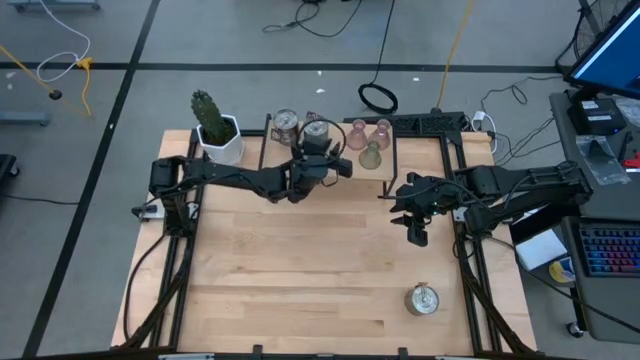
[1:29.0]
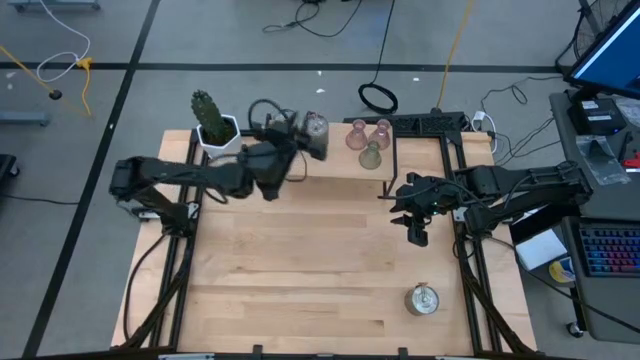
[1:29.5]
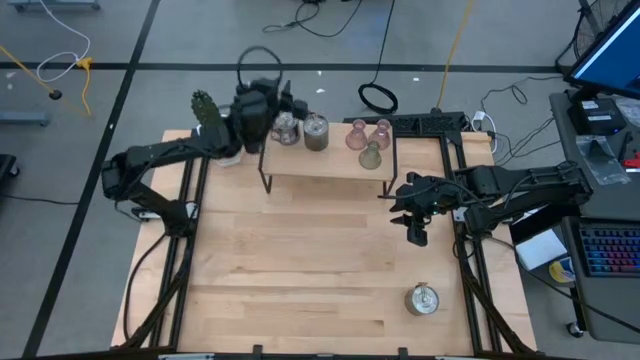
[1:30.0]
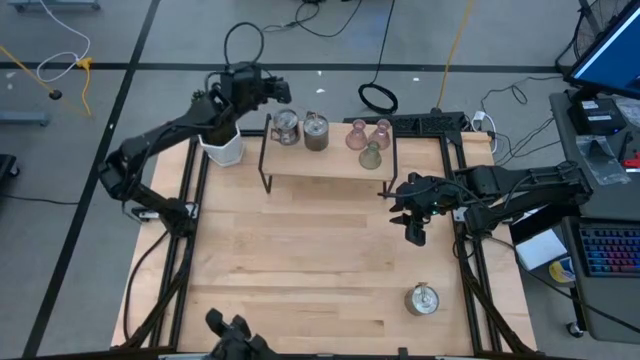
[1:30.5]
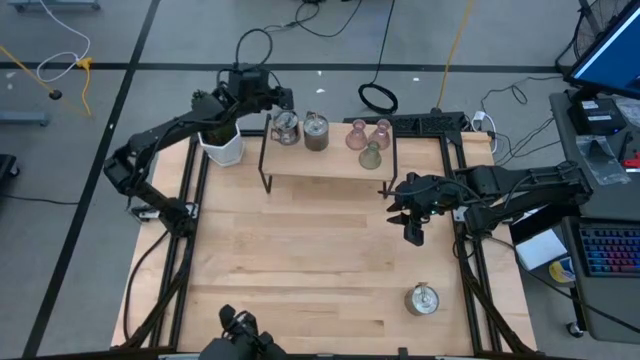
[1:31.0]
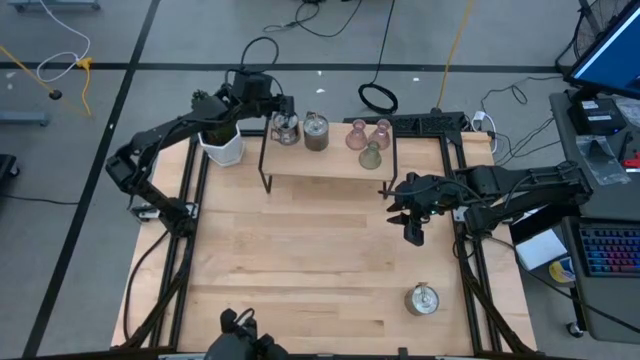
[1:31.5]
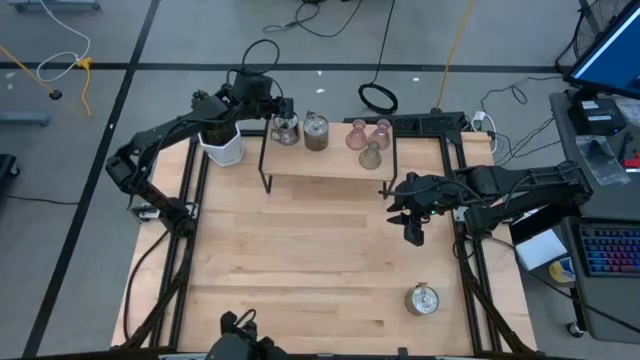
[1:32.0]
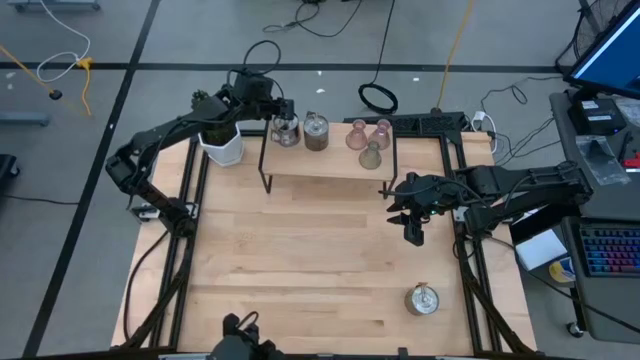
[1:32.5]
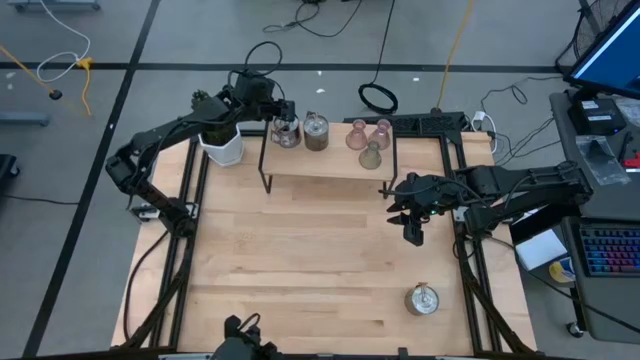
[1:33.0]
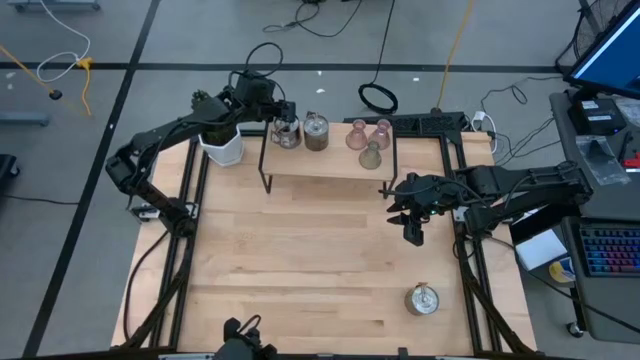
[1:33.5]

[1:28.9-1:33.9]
Task: Pick & Place candle stick holders
Adjust the silver scented candle on the shelf

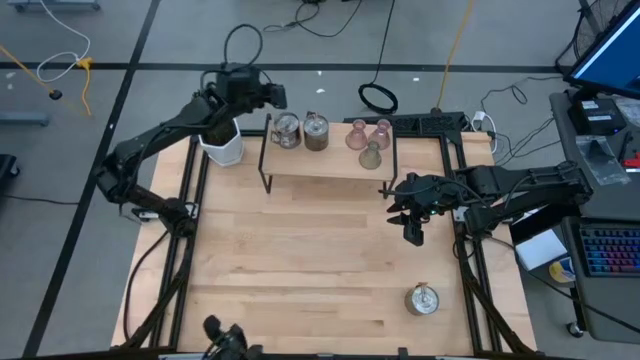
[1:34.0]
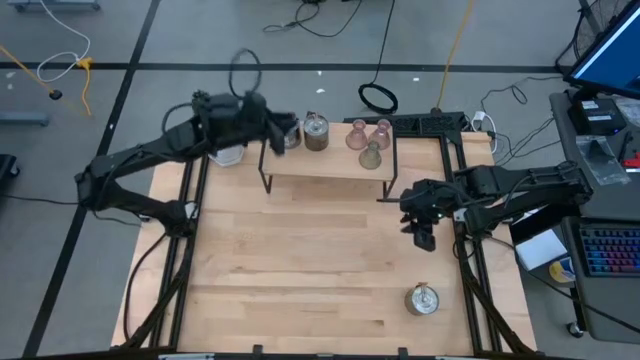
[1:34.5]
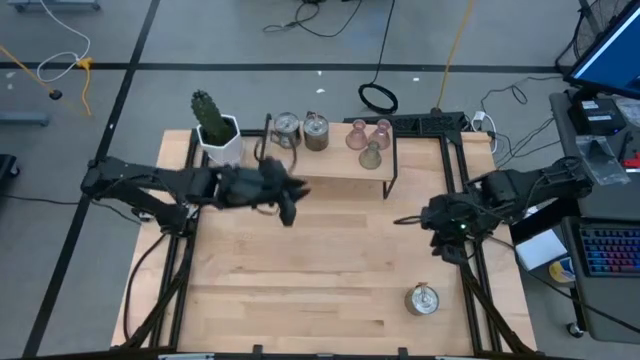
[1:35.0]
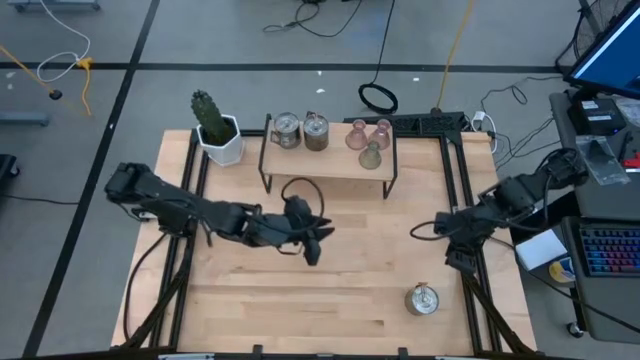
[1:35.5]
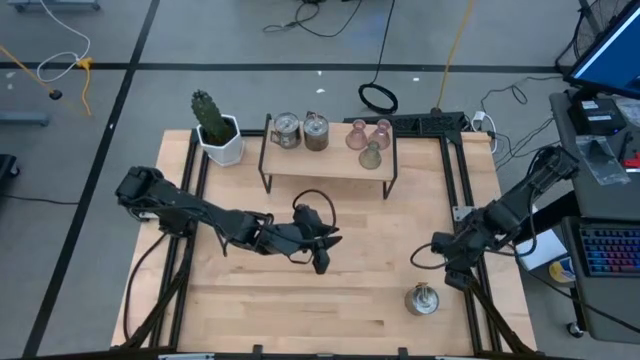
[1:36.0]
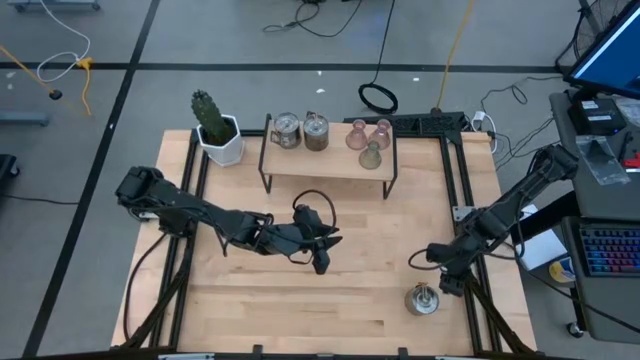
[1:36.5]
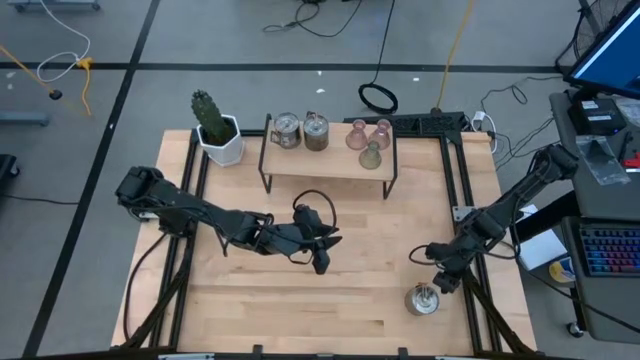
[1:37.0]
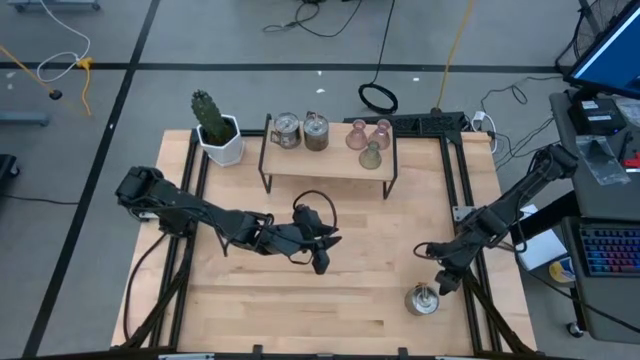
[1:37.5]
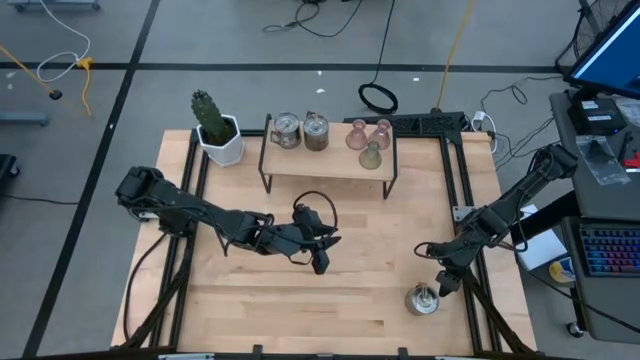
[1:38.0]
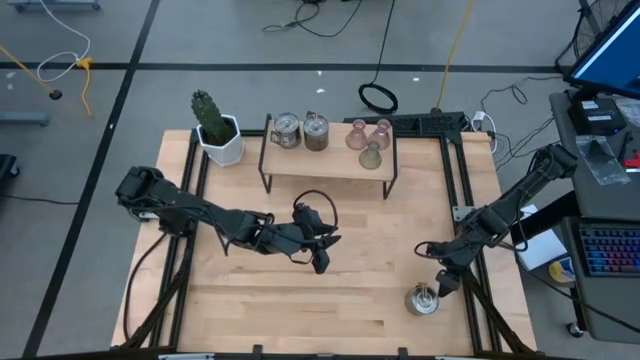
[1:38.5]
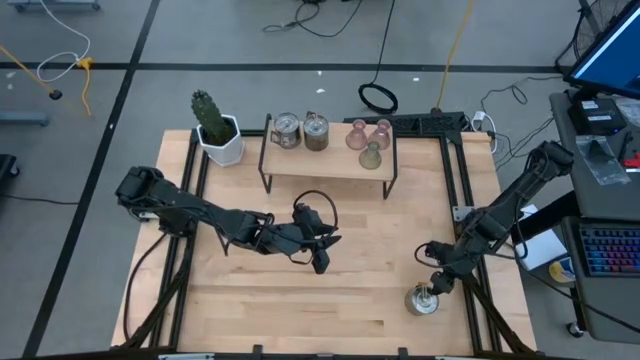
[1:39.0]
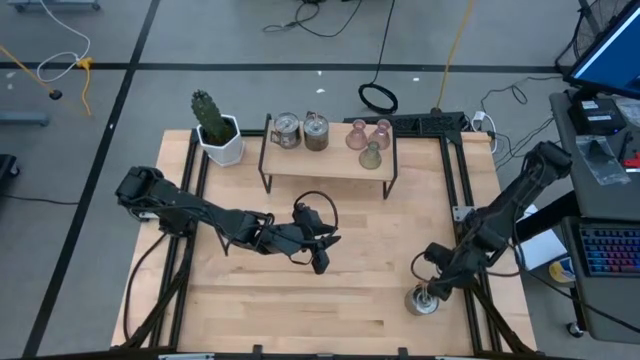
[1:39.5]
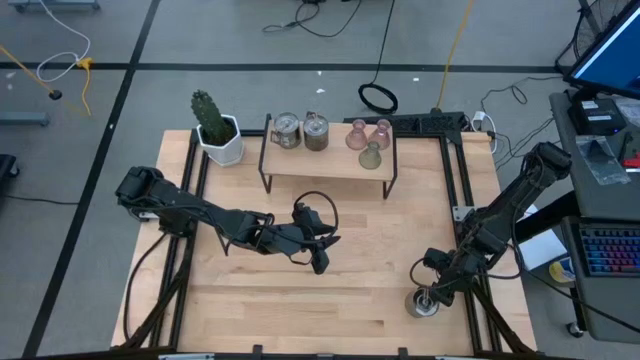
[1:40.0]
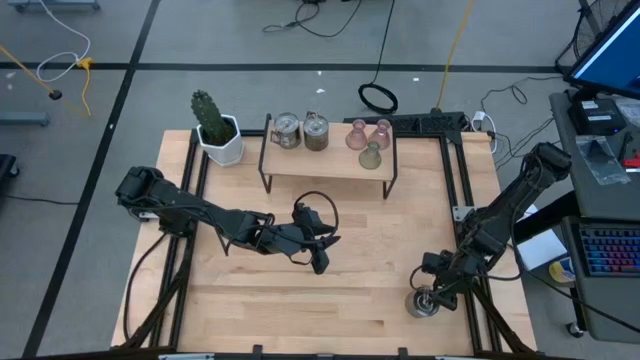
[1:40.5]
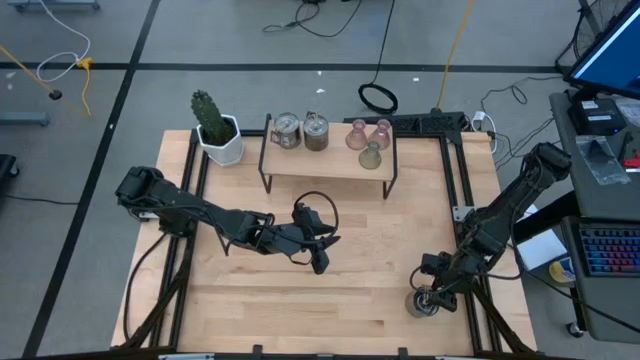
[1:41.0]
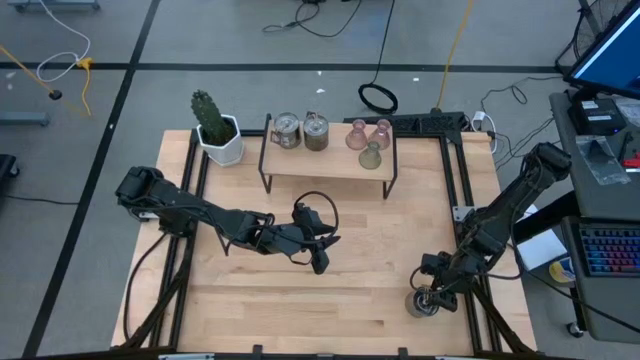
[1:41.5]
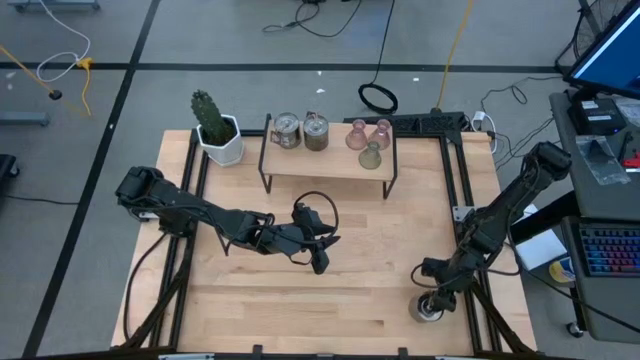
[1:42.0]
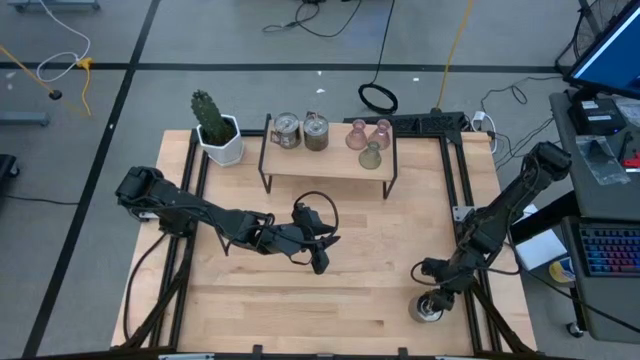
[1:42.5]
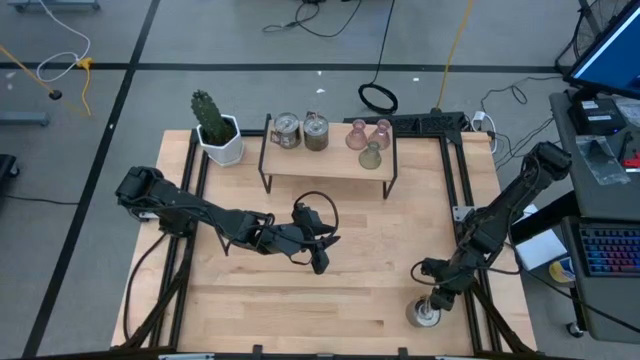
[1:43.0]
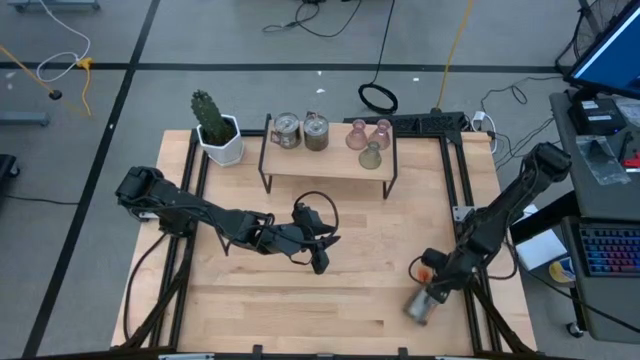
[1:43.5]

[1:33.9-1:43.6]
Put the silver scented candle on the shelf

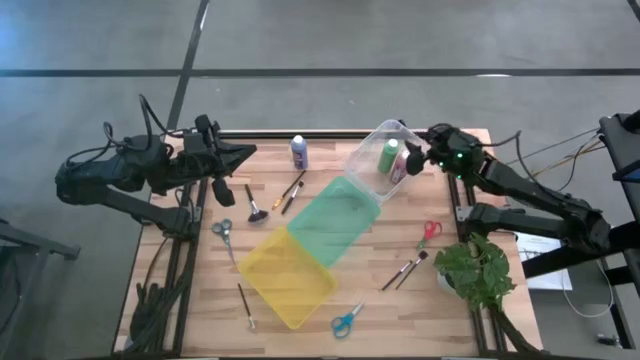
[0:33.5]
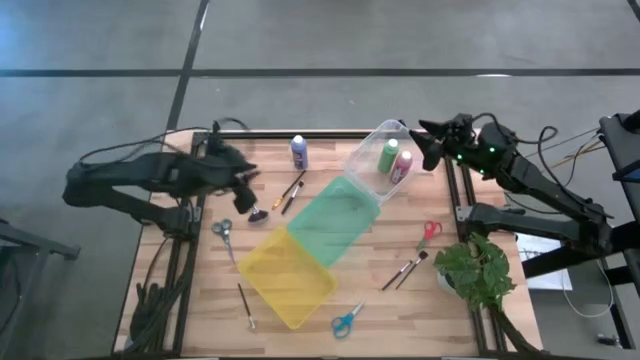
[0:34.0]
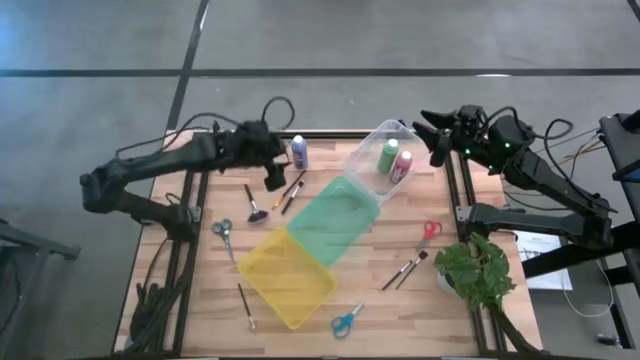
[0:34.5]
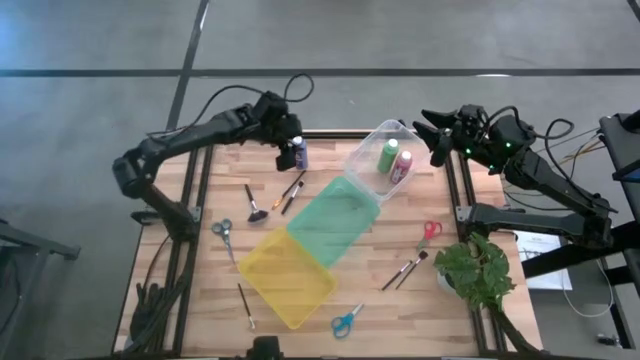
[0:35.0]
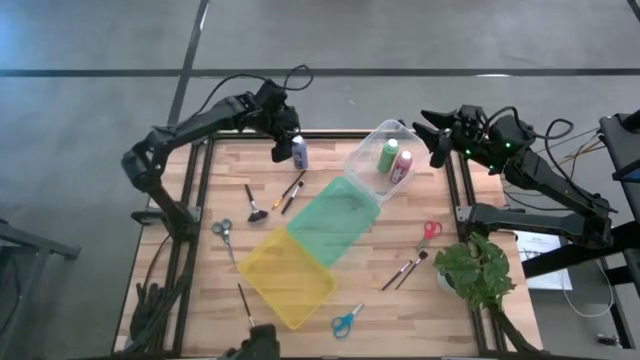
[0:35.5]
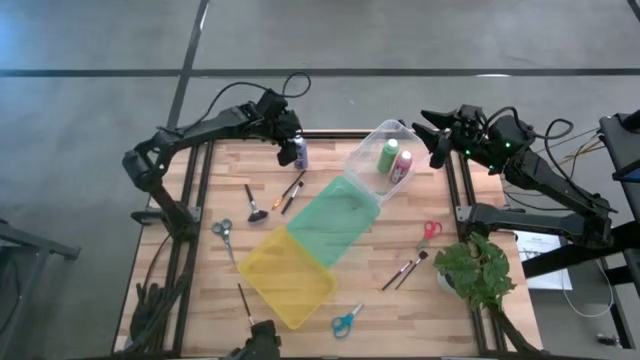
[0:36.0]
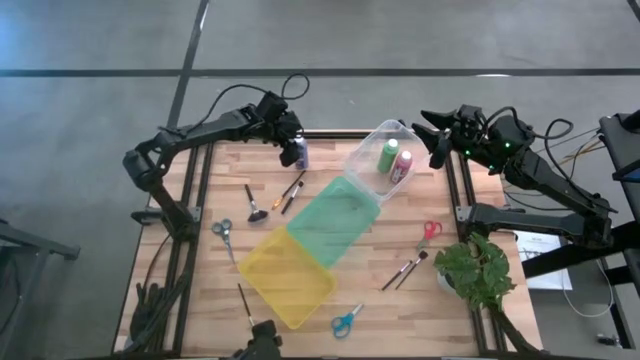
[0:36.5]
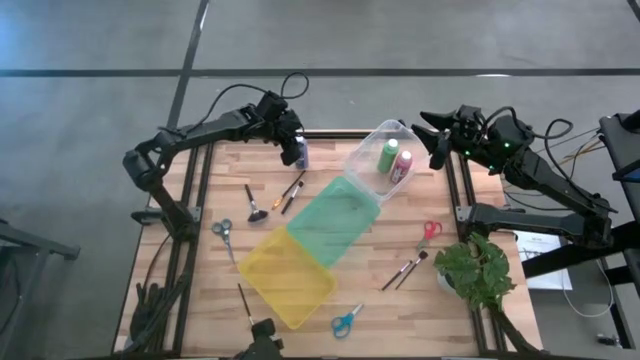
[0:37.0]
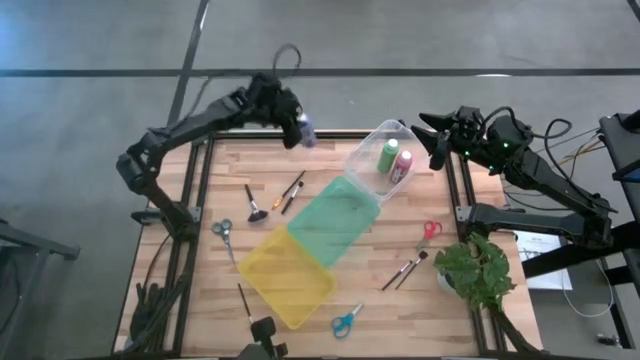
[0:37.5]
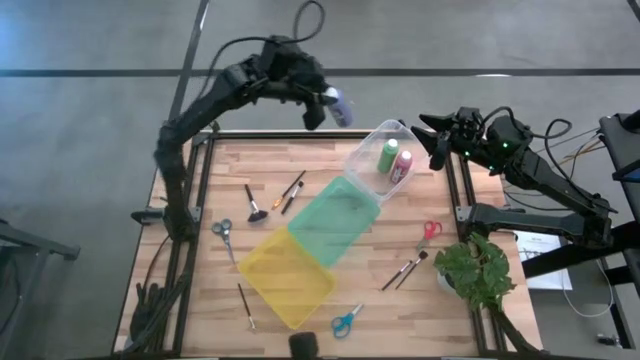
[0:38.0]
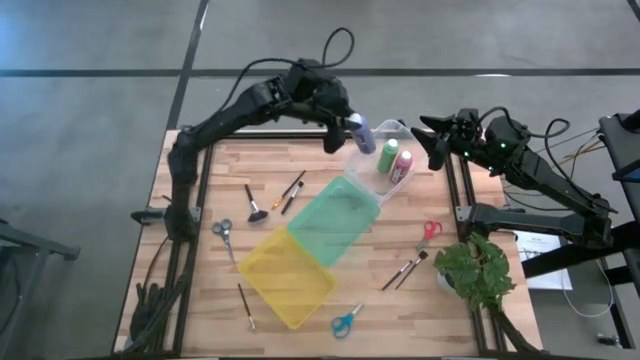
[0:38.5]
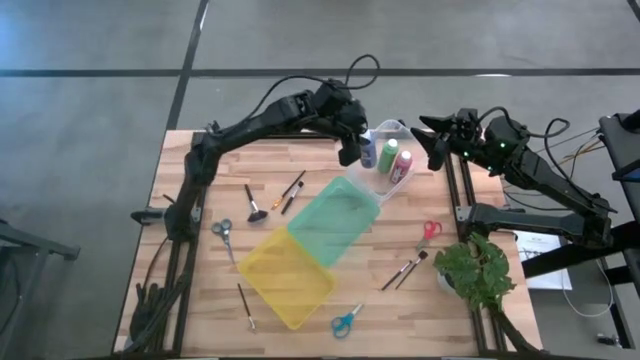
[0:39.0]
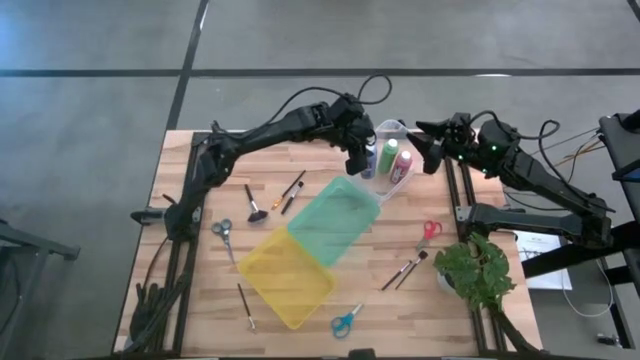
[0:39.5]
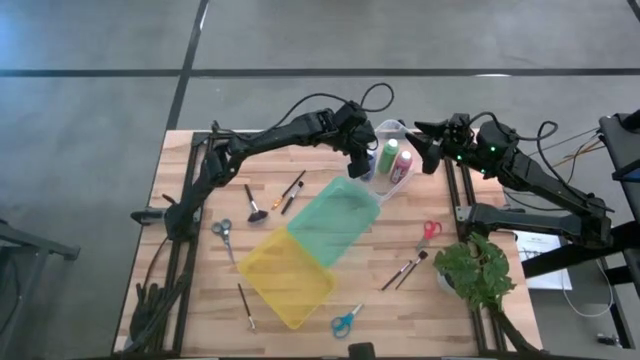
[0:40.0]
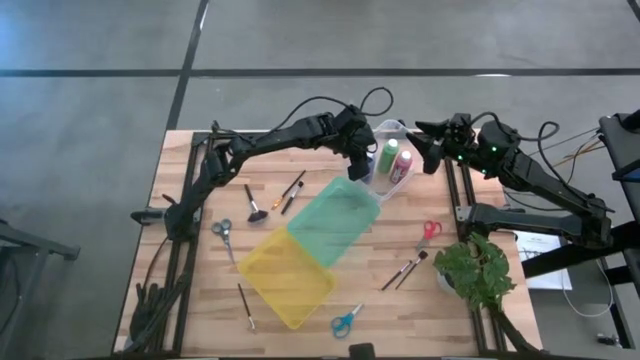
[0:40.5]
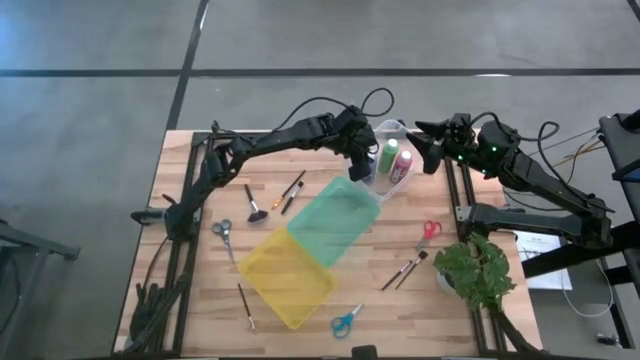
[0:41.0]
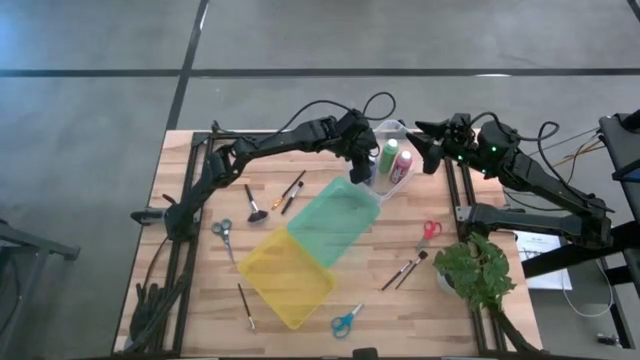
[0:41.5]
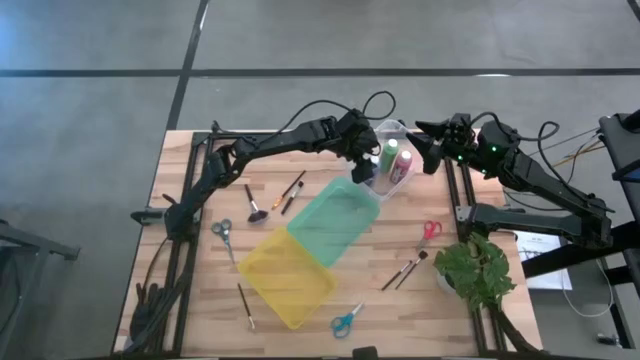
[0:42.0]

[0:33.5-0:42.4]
Task: Pick & Place Paint Supplies
Put the purple paint bottle into the transparent bin
